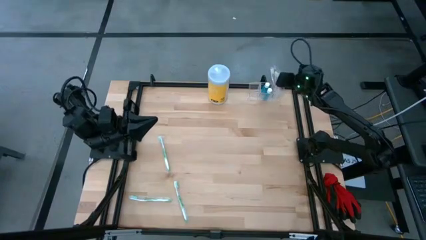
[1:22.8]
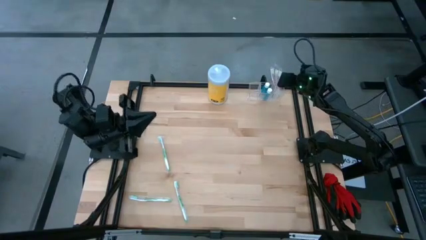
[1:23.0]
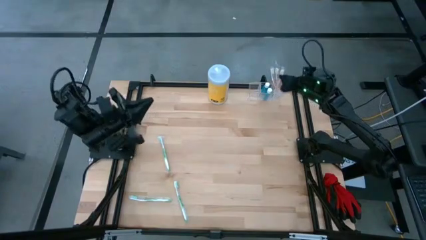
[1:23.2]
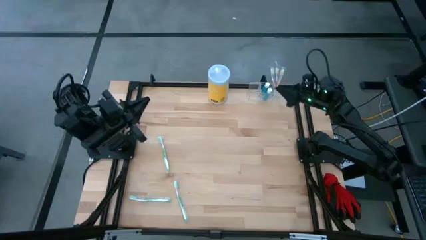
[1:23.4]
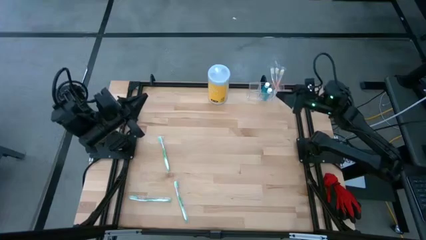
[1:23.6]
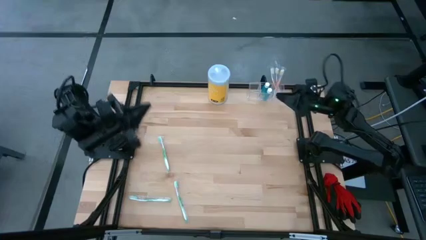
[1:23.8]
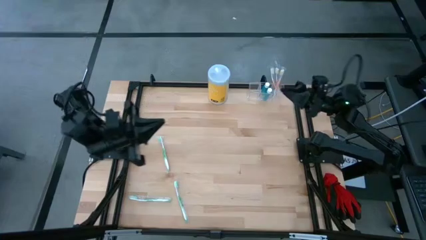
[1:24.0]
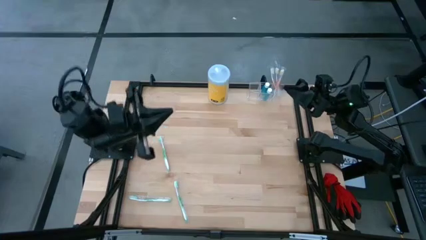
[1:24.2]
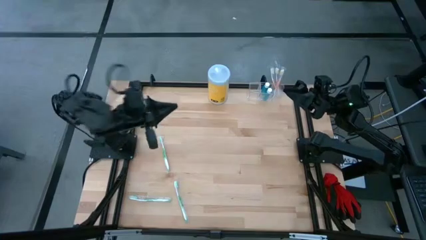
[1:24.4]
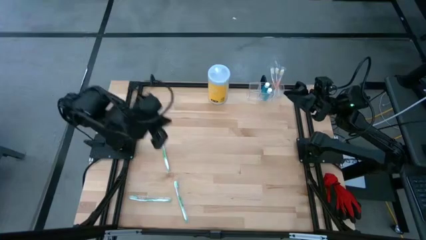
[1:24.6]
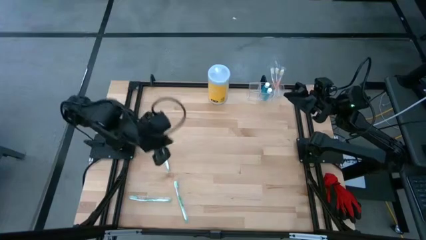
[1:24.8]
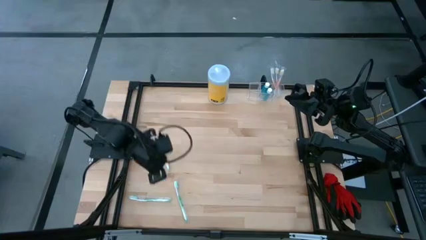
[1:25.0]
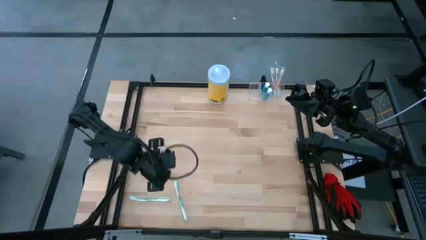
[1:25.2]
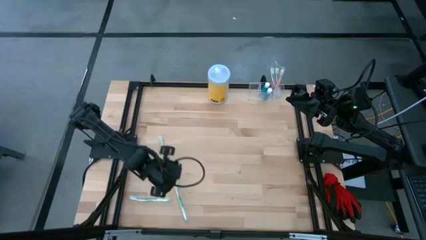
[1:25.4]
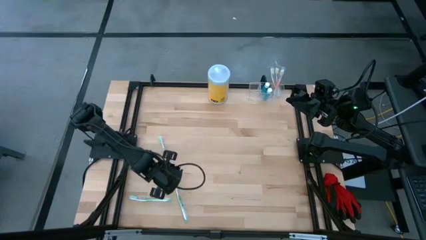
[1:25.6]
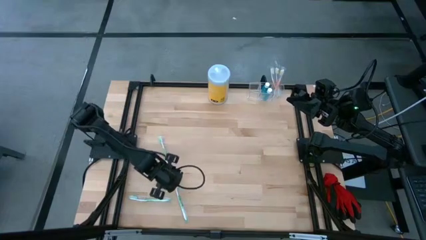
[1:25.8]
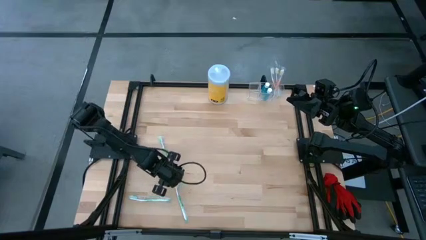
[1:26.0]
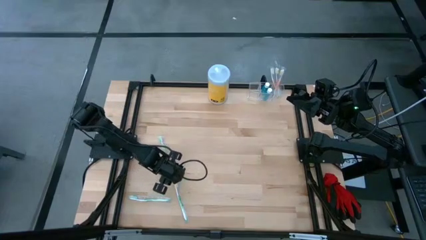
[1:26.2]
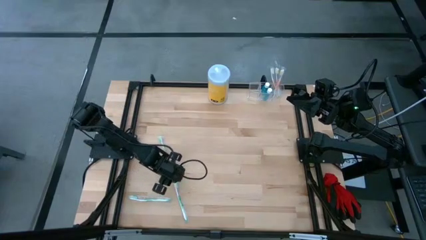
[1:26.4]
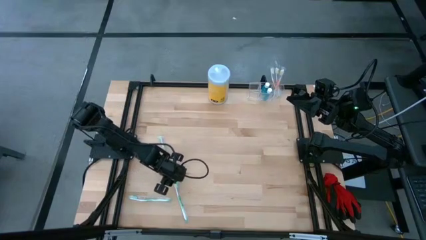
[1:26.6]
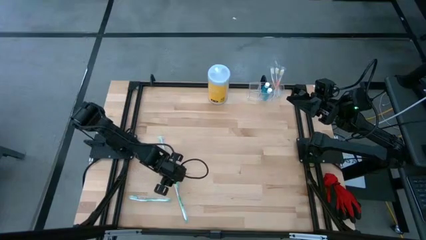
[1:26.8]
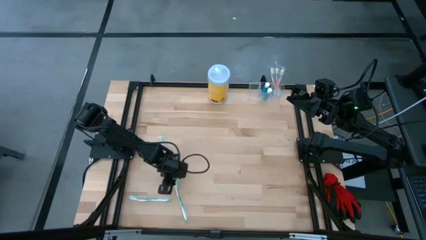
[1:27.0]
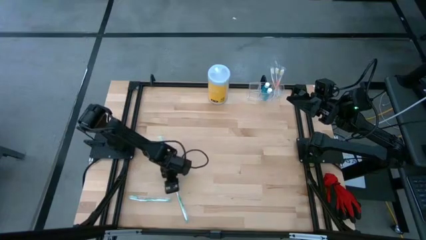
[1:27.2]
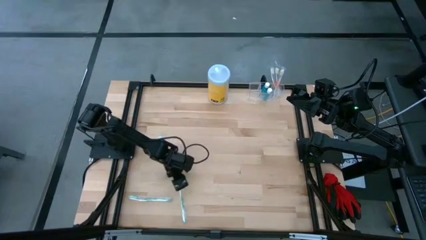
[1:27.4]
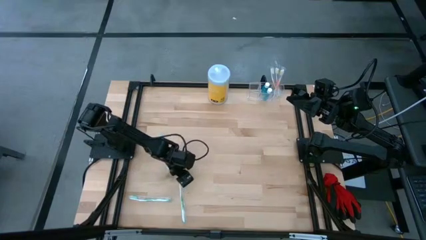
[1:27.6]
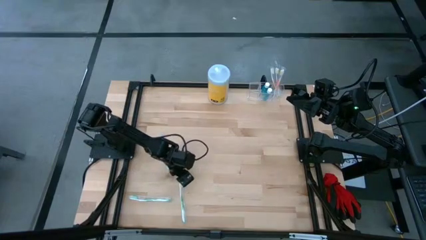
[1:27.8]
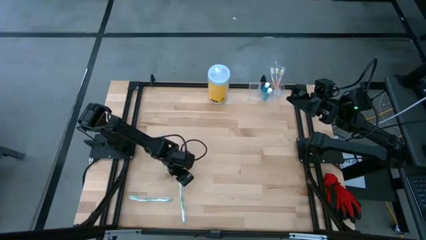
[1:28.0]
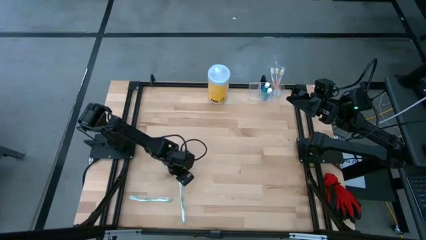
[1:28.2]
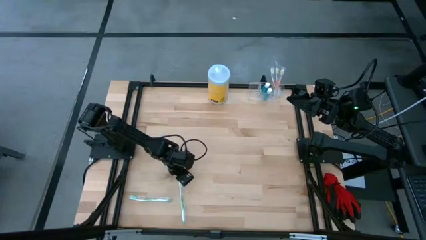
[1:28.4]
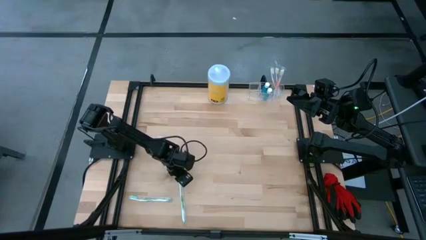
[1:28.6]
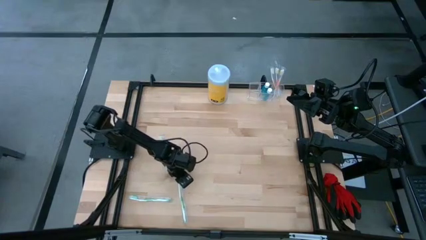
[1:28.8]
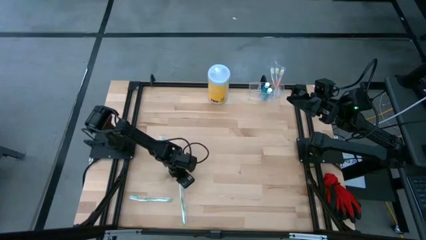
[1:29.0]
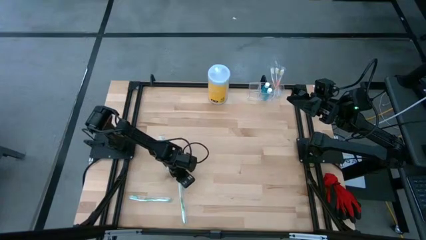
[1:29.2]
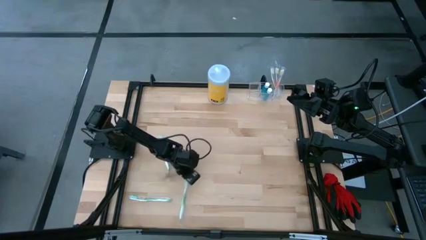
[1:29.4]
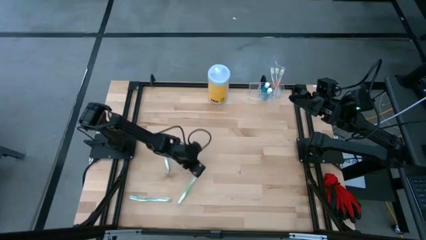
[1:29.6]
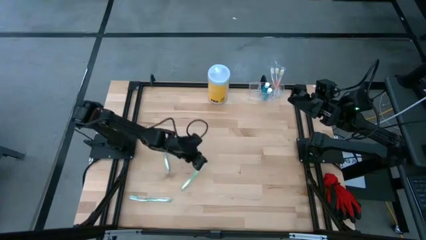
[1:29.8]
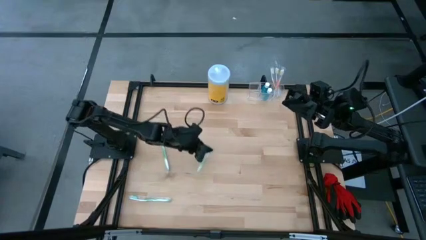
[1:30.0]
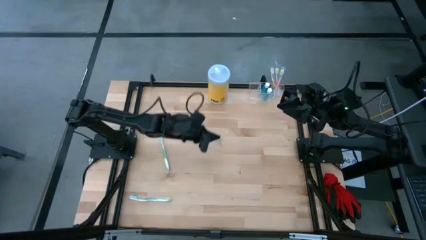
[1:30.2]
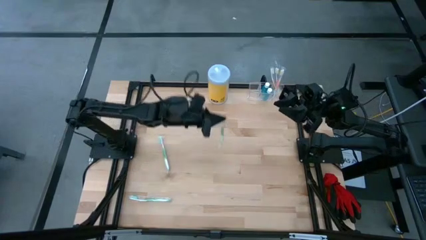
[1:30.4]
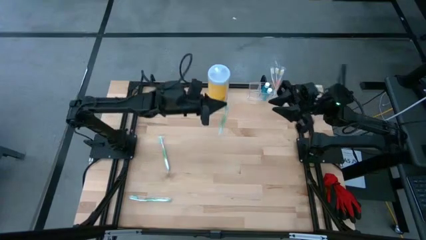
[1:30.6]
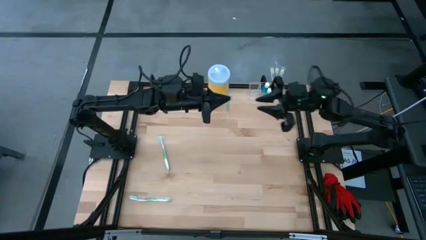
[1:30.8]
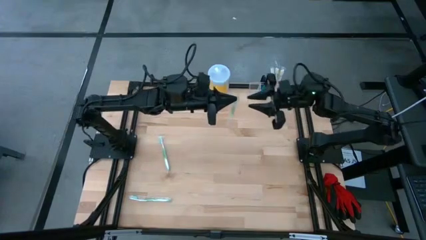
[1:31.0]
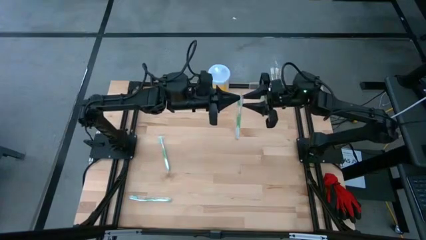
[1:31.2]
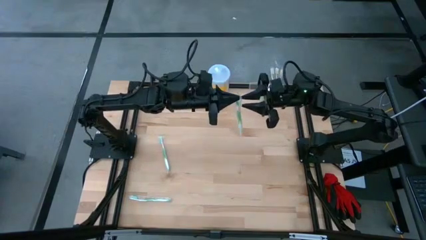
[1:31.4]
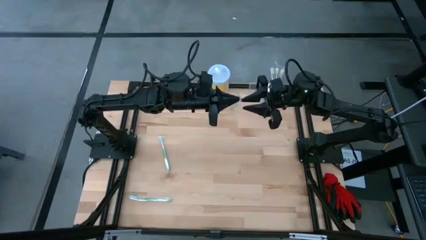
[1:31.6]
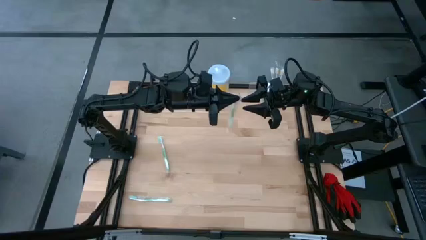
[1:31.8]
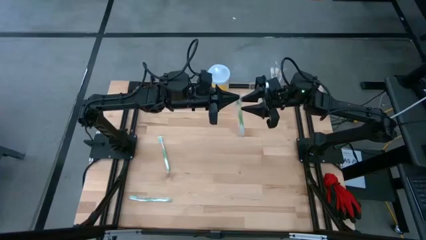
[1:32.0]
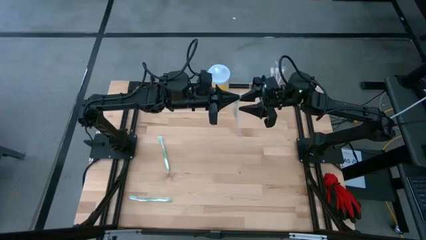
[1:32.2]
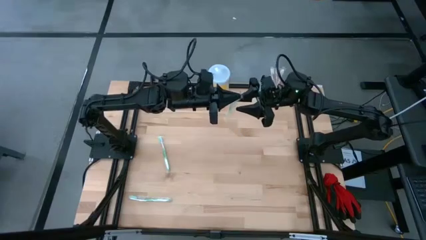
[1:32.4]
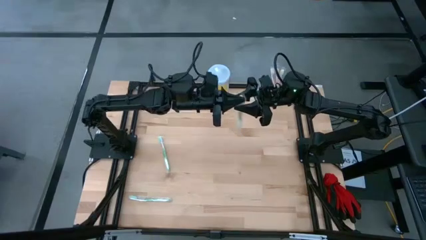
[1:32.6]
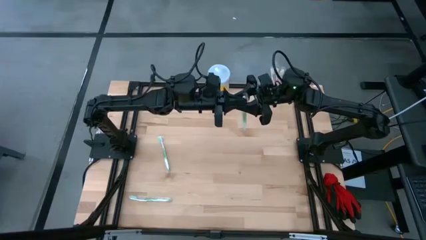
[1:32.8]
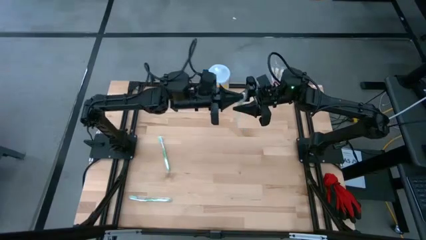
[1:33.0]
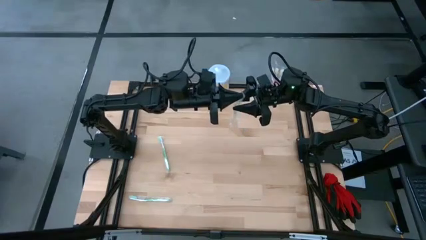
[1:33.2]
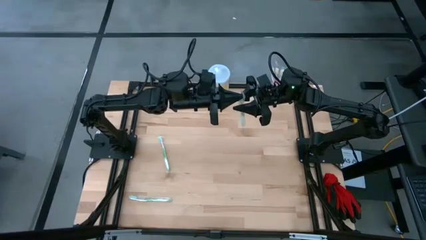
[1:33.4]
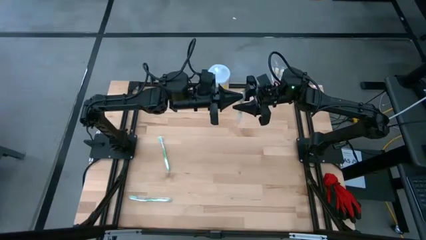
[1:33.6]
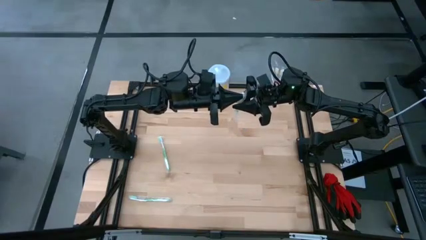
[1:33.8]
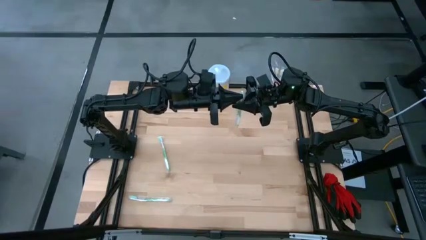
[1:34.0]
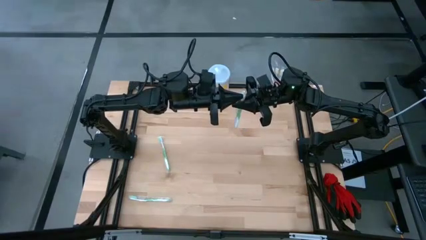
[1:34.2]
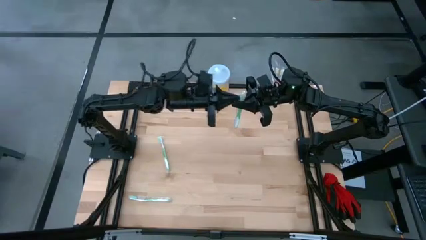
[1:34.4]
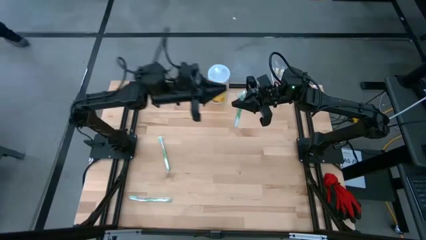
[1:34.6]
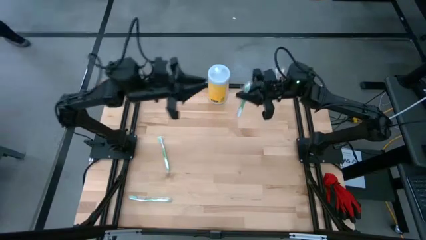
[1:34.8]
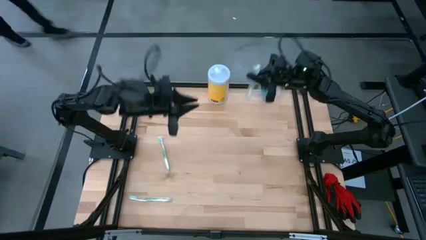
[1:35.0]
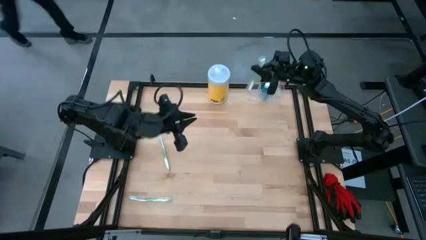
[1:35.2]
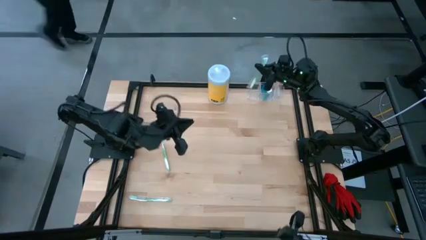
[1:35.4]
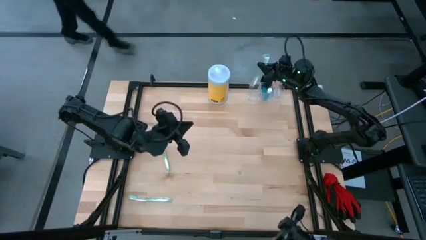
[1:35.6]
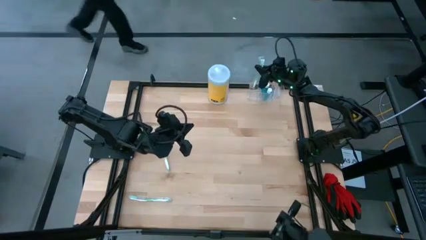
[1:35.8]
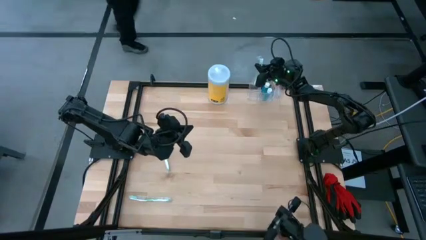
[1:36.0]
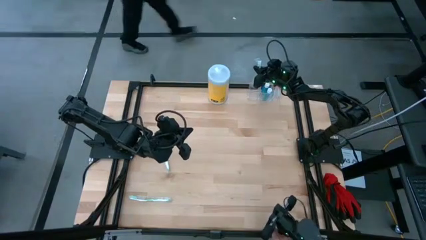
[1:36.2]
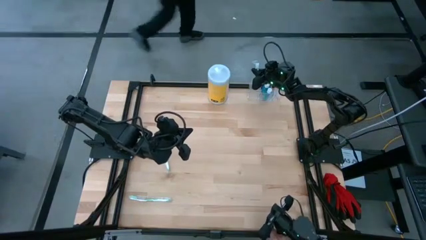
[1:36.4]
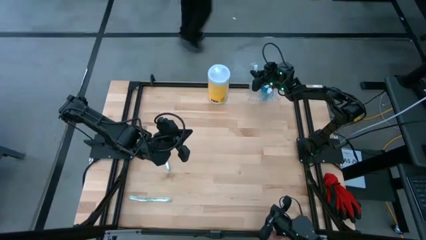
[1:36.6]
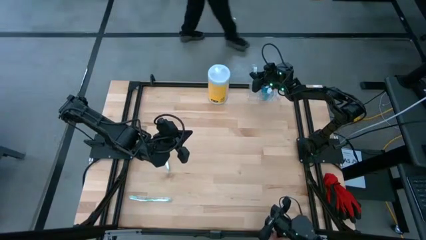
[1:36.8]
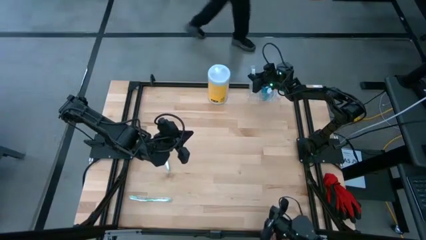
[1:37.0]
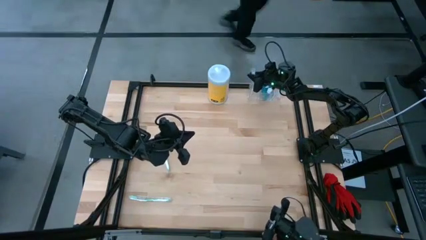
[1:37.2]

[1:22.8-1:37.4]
Task: Pick & Place toothbrushing station
Put the bottom right green toothbrush into the transparent organizer

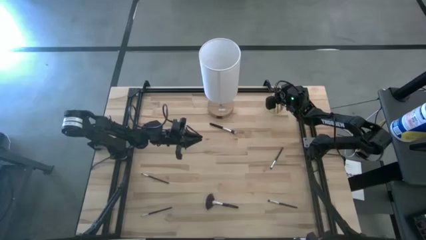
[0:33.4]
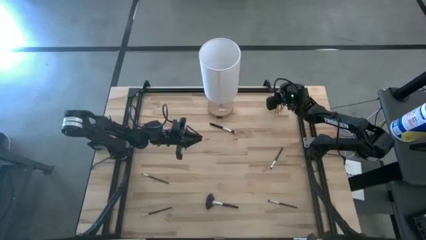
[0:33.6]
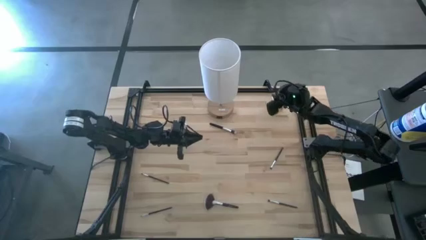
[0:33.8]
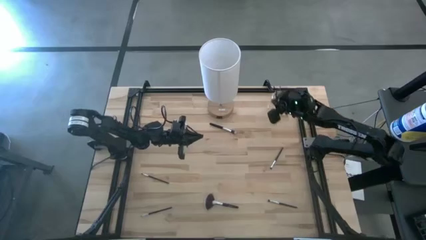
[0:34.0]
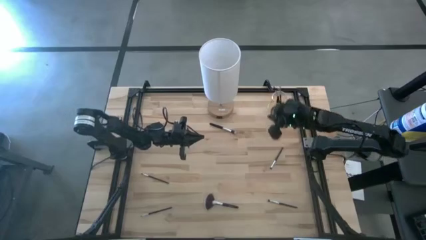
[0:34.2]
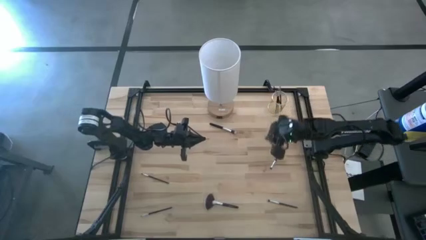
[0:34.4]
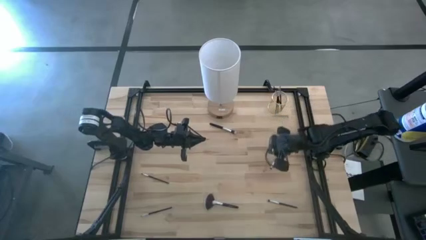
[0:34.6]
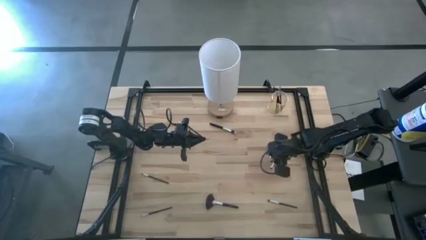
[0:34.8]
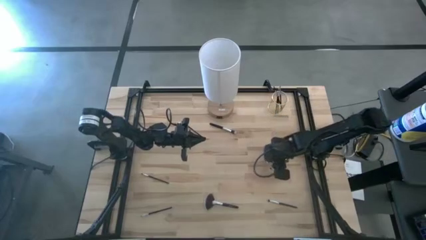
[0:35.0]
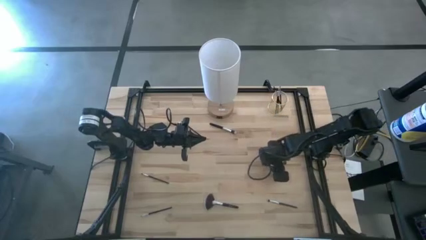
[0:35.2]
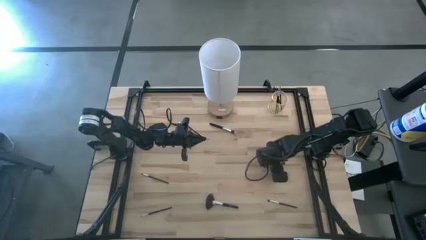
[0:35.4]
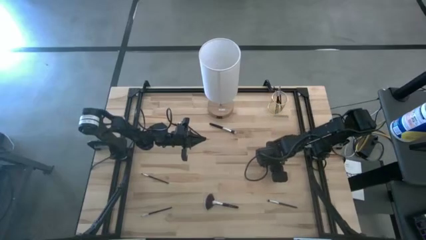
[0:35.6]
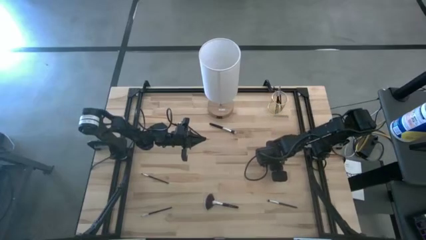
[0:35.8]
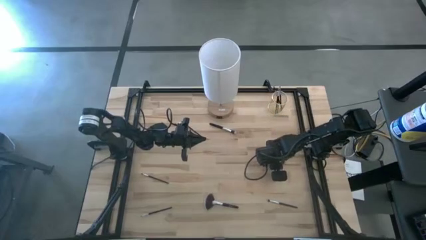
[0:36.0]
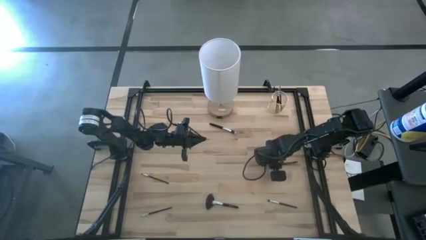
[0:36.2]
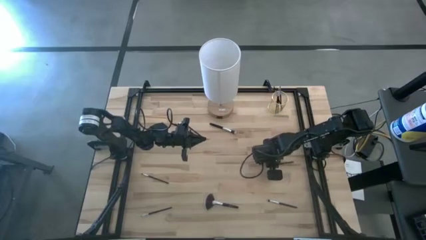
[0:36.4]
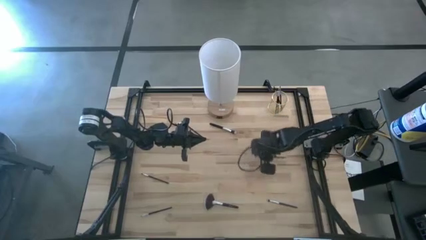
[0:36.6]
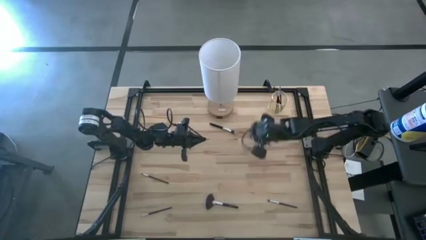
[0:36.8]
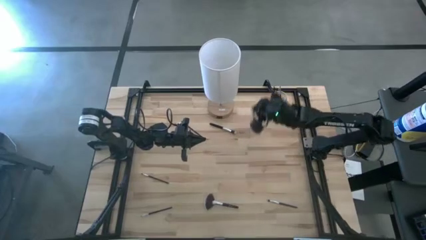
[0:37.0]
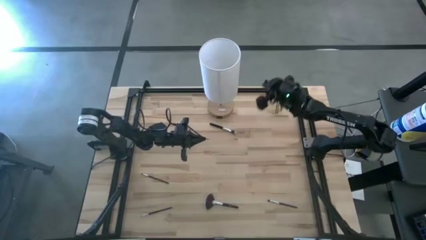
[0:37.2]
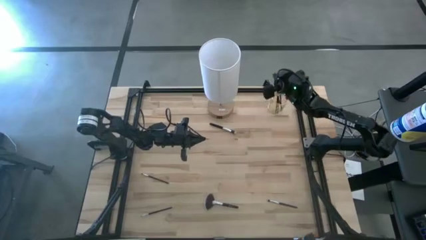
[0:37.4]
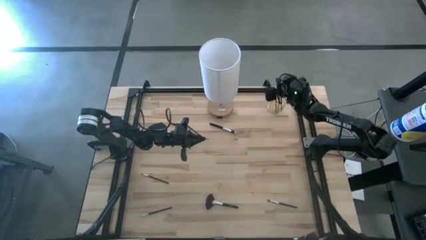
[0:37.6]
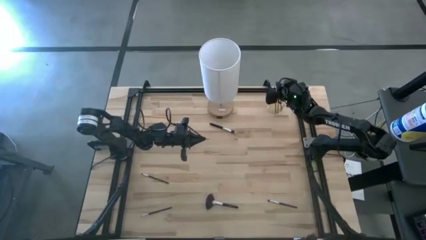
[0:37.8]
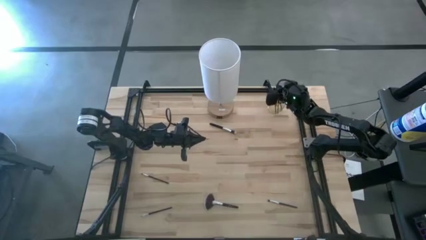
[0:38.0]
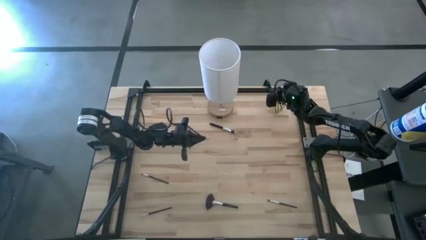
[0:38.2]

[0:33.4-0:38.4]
Task: Pick & Place Makeup Brushes
Put the eyeshadow brush into the makeup brush holder
